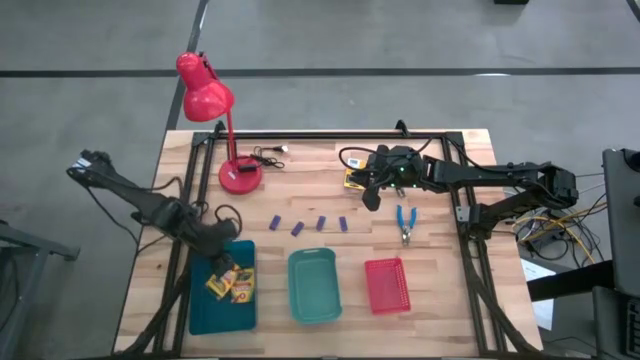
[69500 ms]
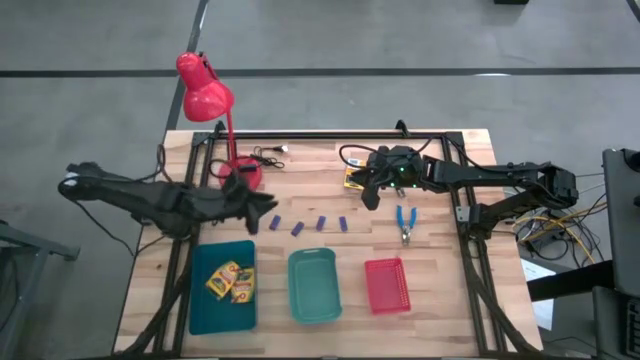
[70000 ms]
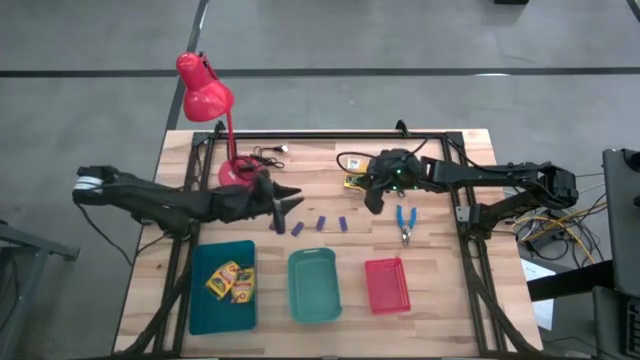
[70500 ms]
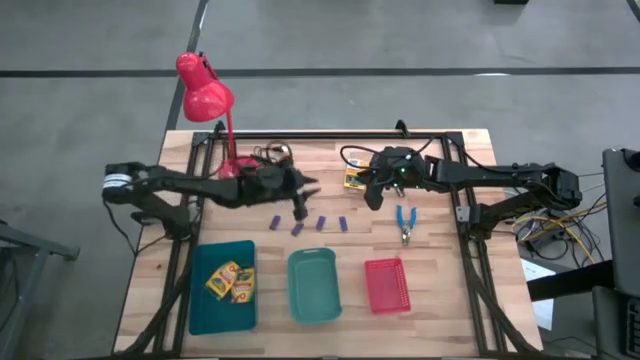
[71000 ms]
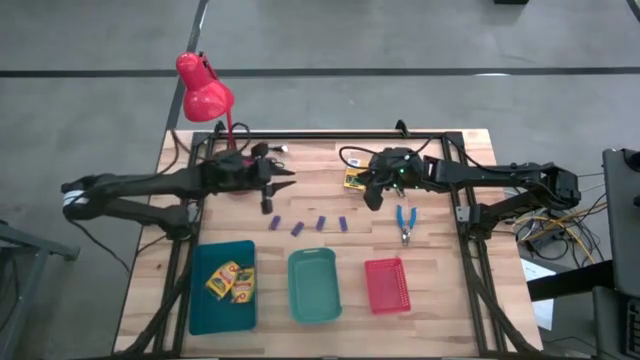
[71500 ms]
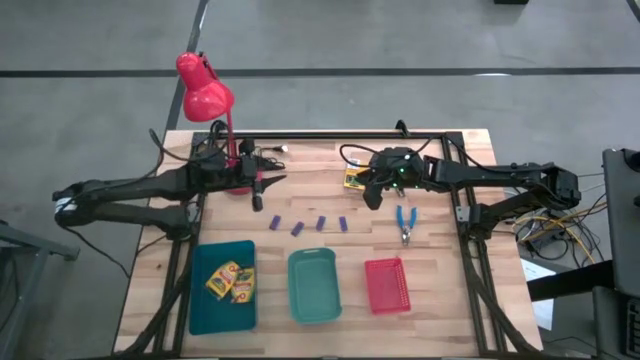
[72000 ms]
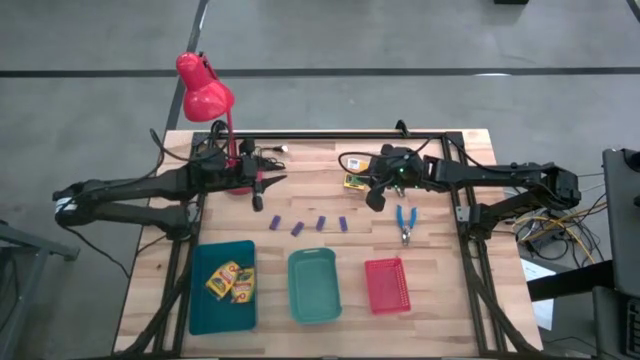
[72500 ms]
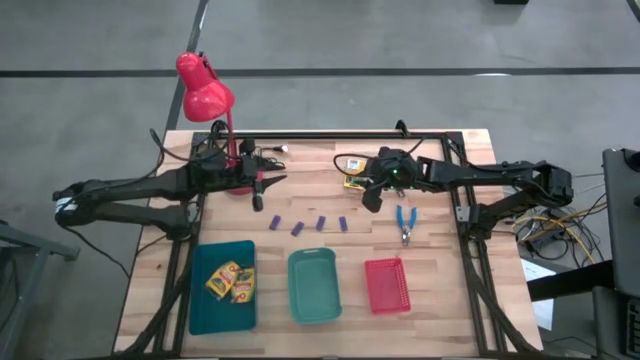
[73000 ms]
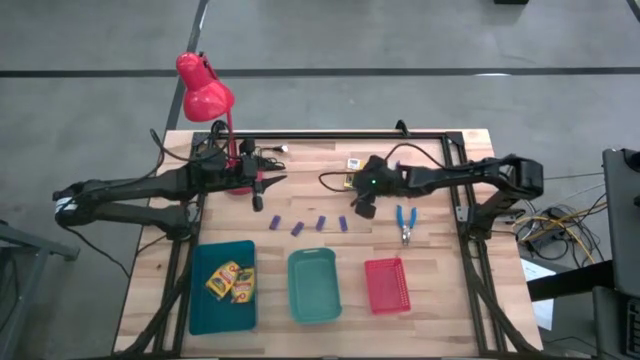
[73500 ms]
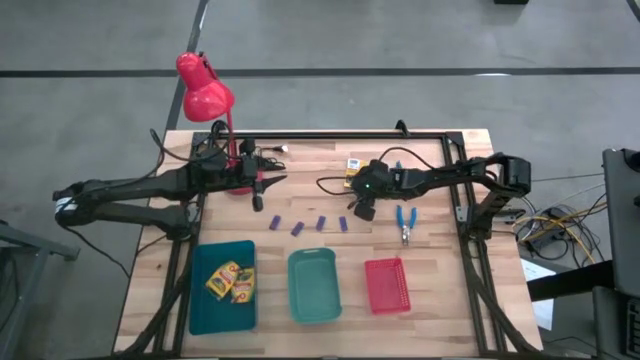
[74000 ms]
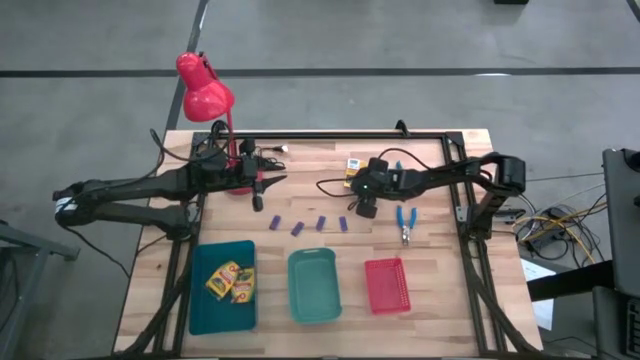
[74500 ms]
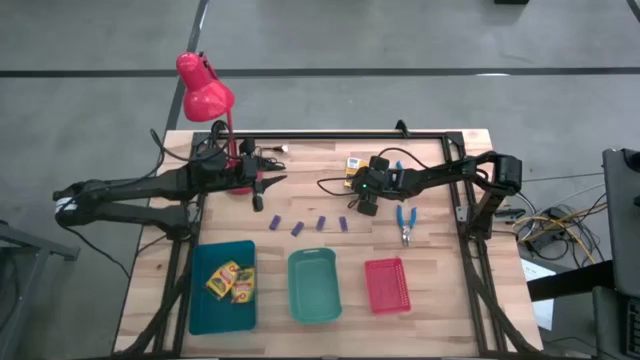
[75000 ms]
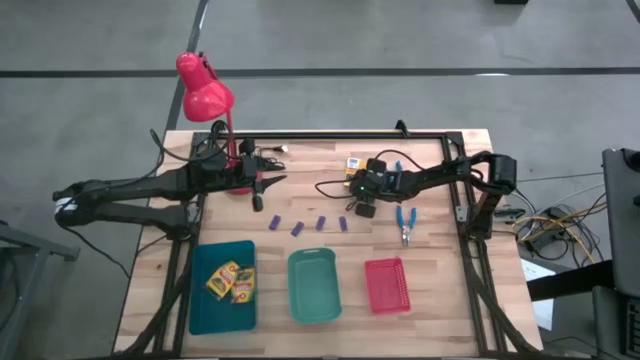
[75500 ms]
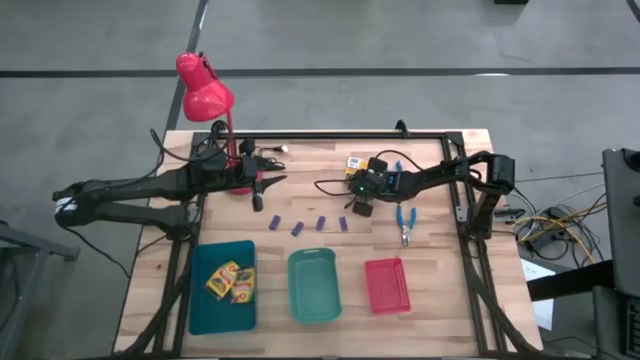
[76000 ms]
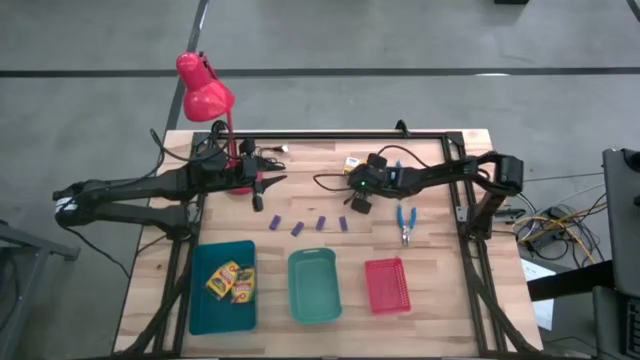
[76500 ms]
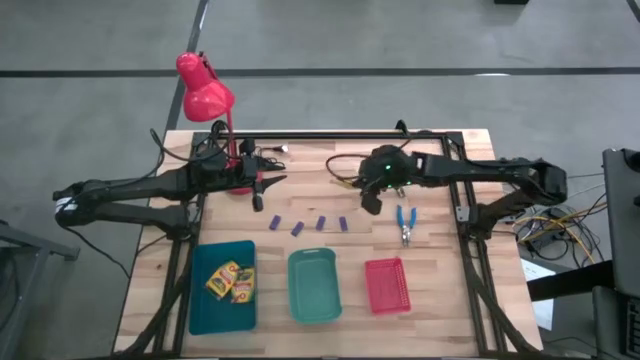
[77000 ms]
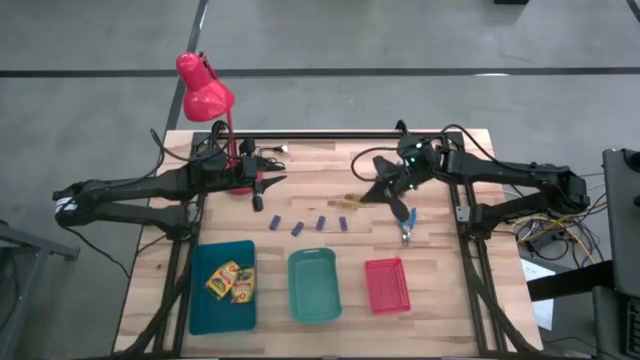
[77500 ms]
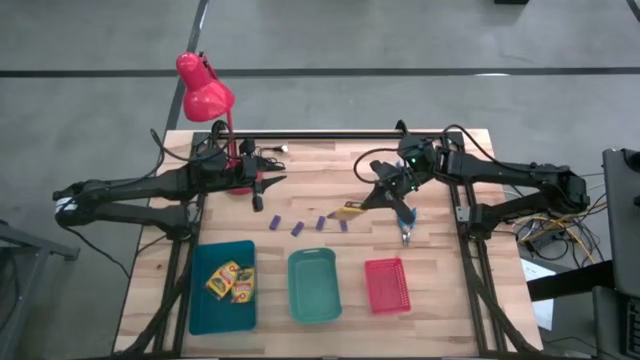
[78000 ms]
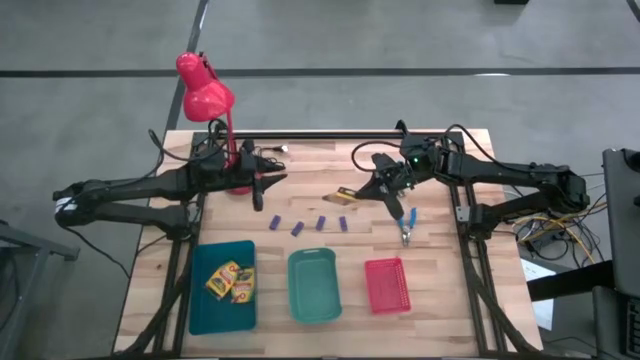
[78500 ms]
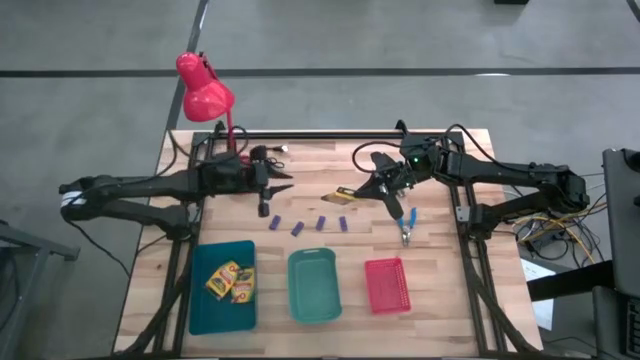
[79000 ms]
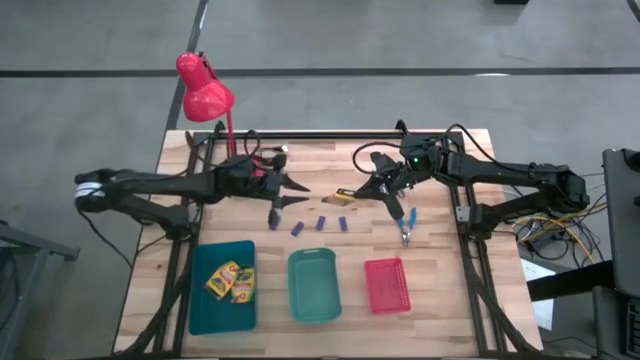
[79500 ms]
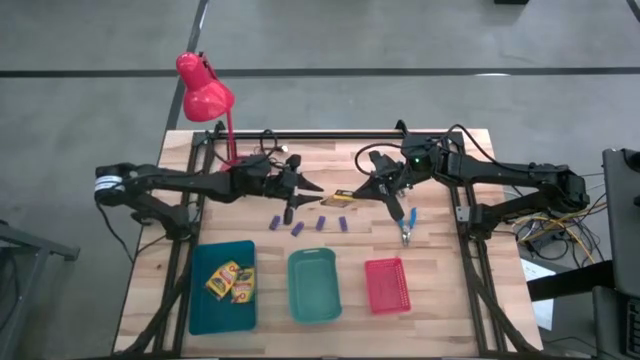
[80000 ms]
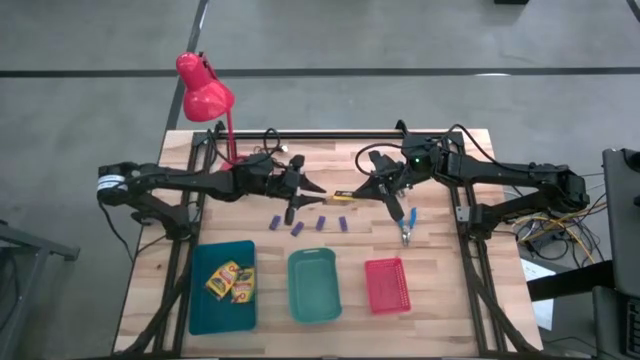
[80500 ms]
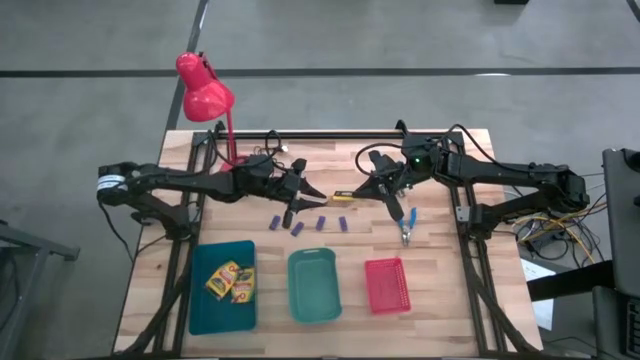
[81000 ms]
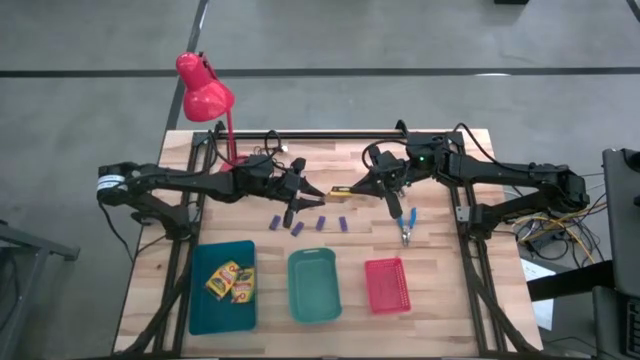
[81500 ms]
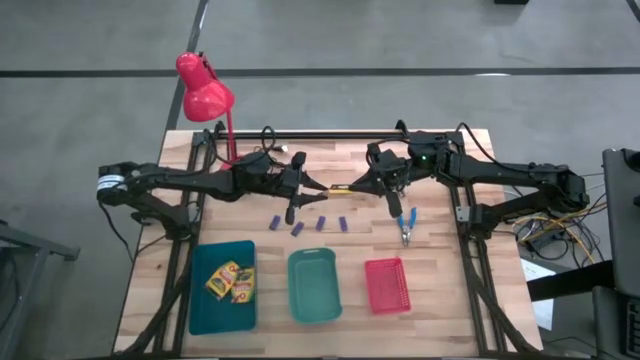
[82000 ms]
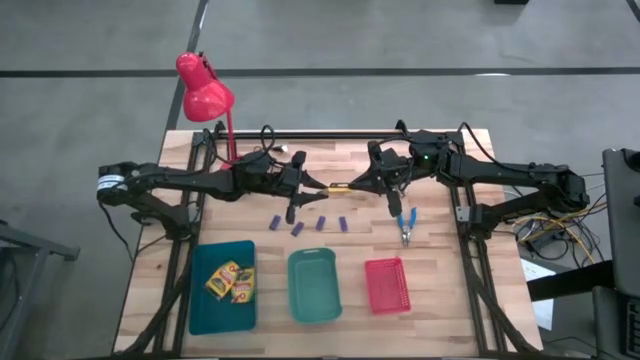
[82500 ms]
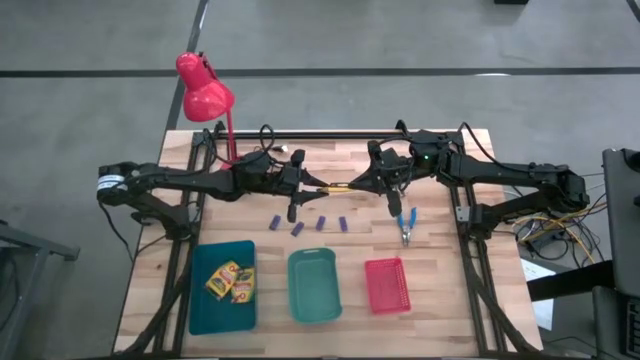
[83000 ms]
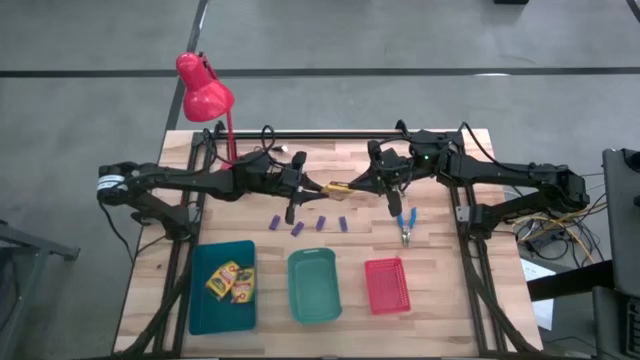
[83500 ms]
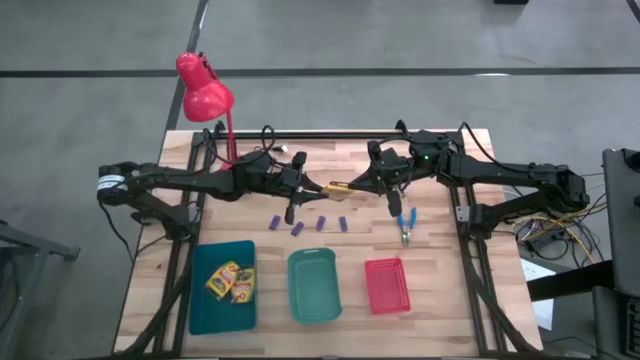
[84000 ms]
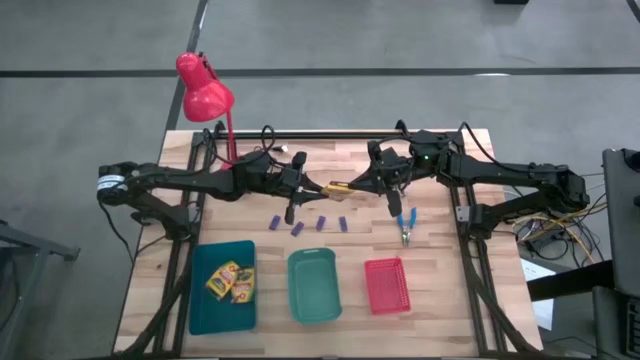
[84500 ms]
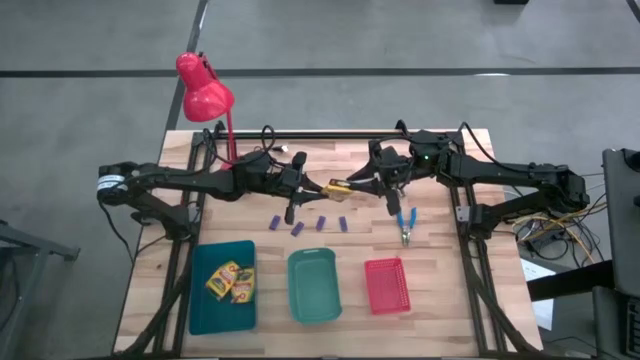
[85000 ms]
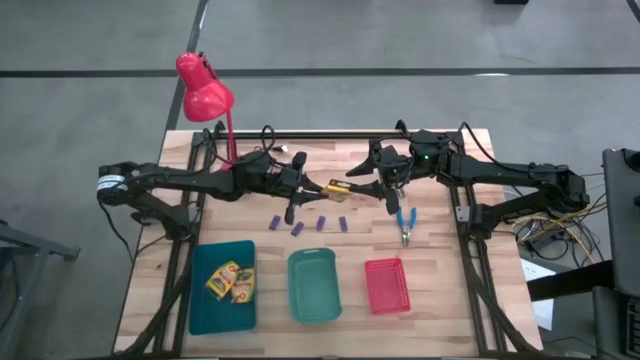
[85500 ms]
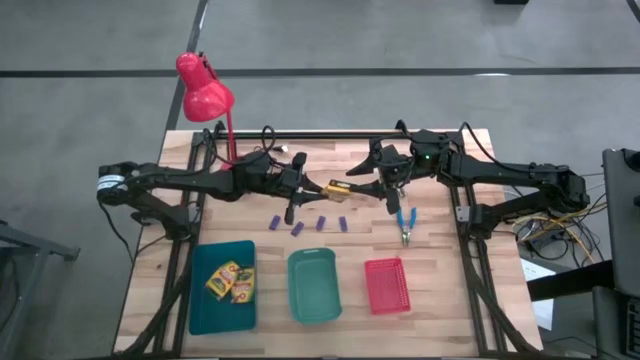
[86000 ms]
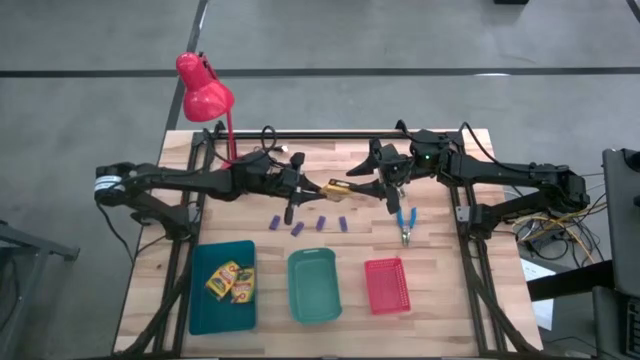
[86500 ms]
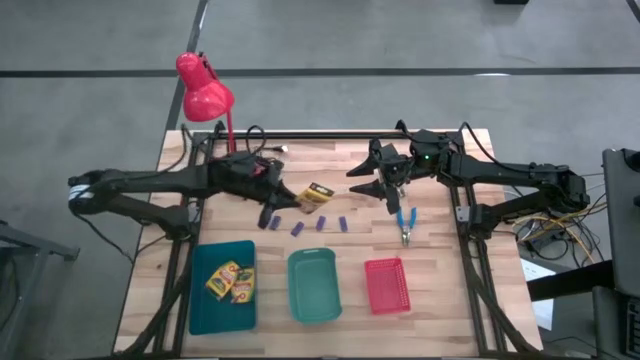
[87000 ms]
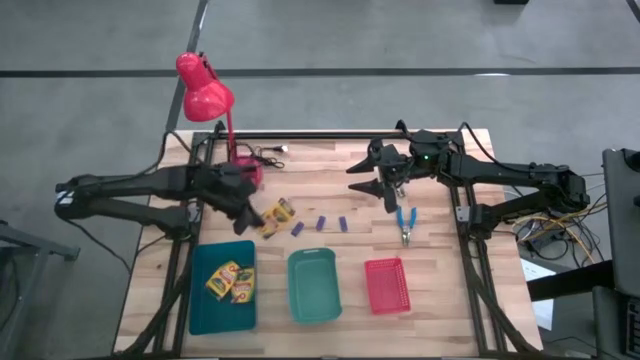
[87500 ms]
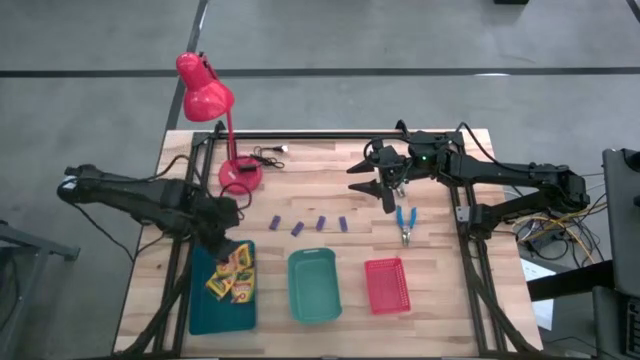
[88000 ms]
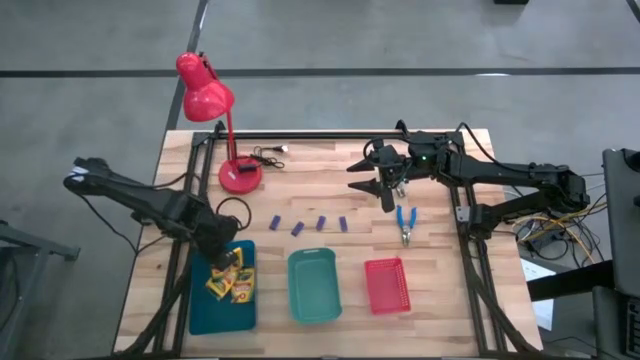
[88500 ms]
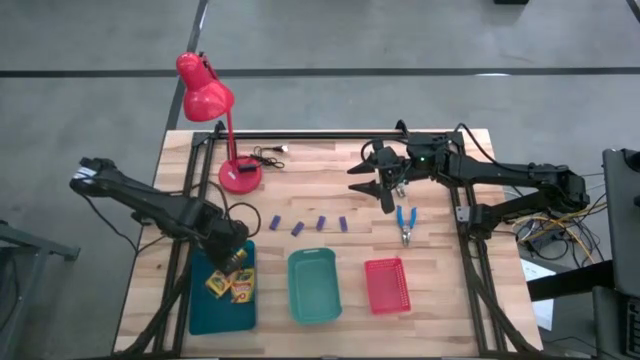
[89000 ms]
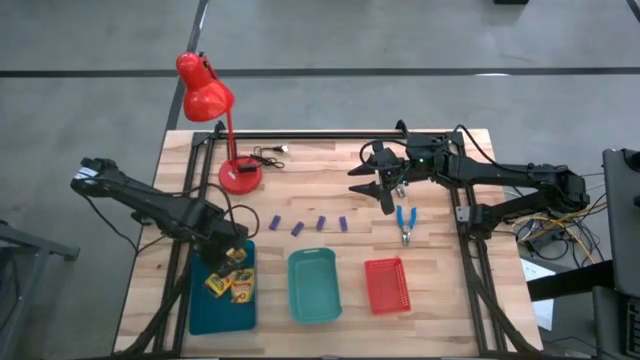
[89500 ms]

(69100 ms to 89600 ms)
Task: Pick & Place School Supplies
Put the crayon box into the blue bin

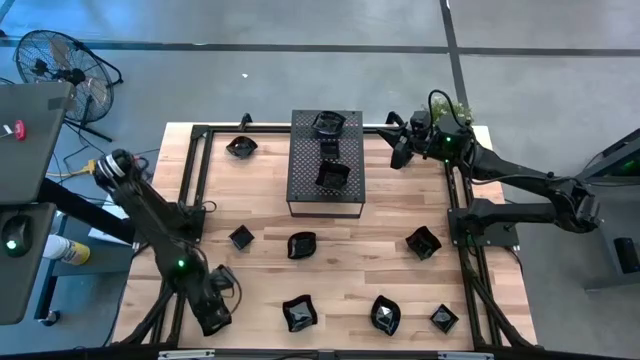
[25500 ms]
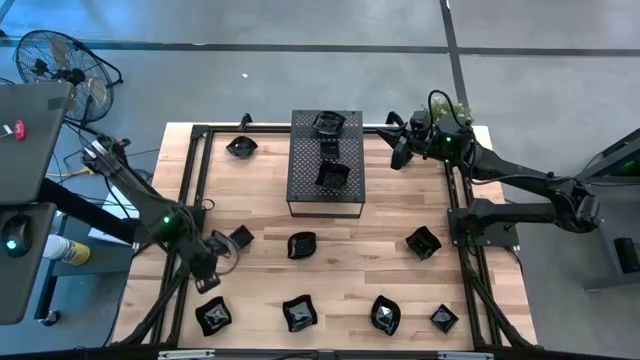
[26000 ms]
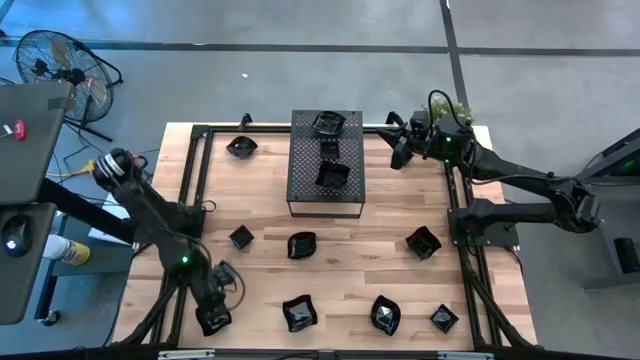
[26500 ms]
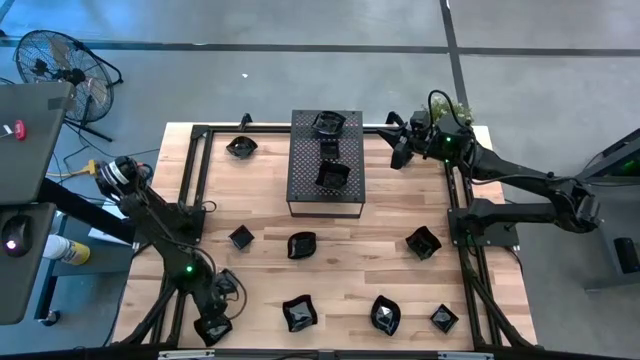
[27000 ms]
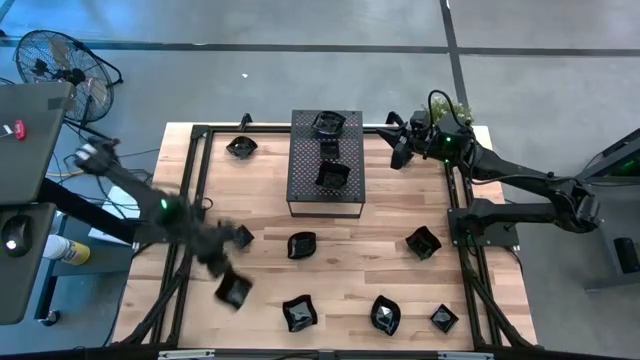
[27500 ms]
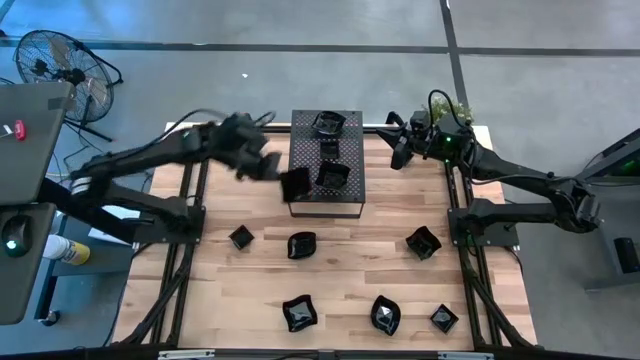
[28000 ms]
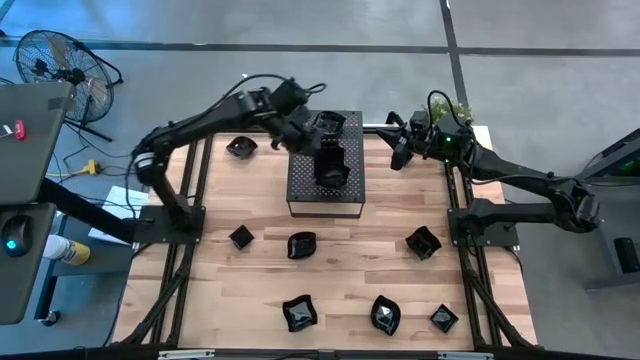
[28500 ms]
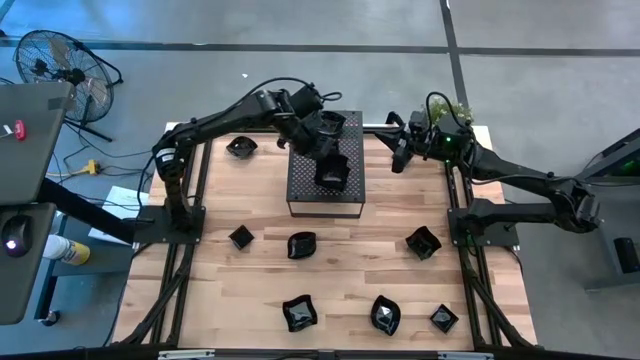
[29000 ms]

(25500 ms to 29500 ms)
Task: Pick & Place Mini shaped plates
Stack the distorted square plate on top of the distorted square plates on the shelf
